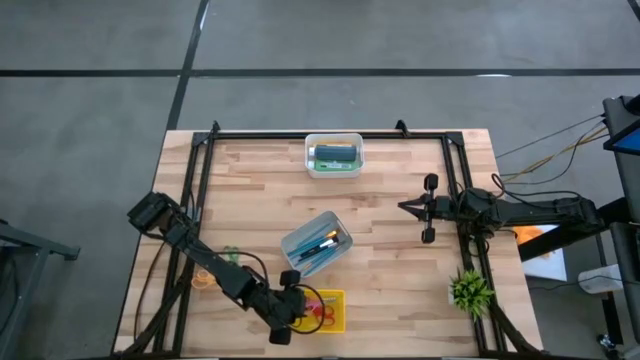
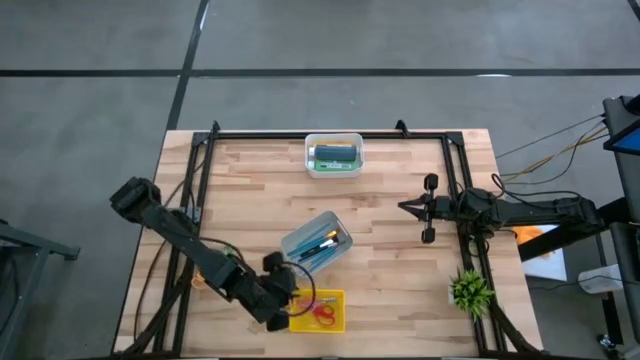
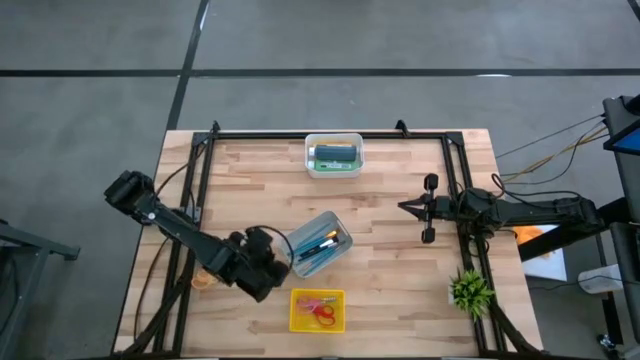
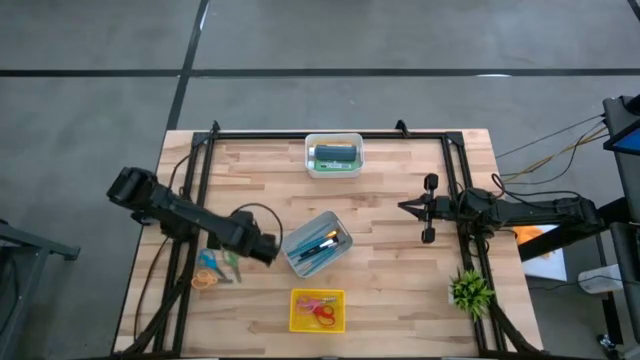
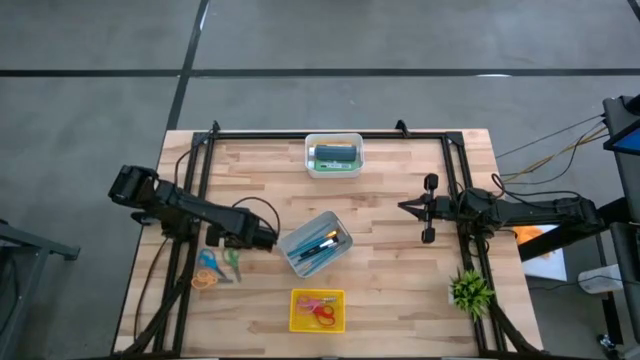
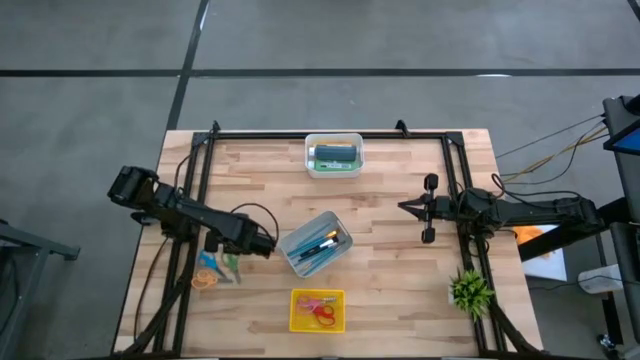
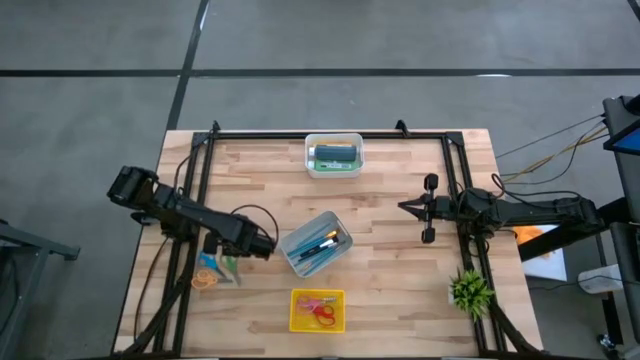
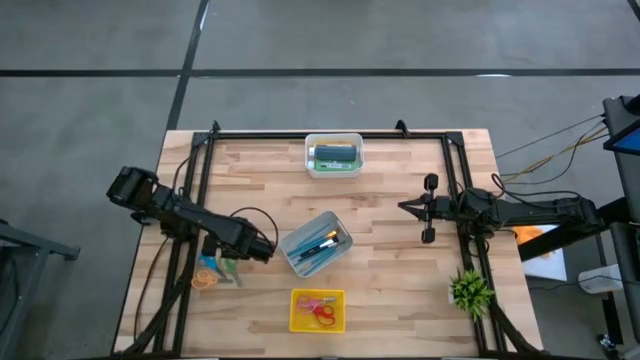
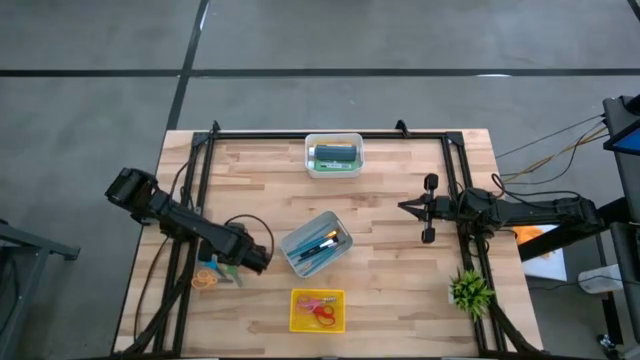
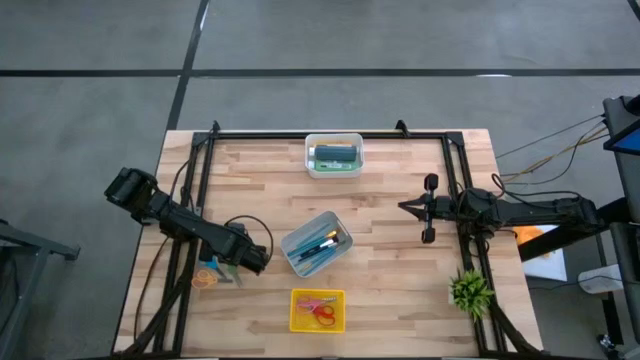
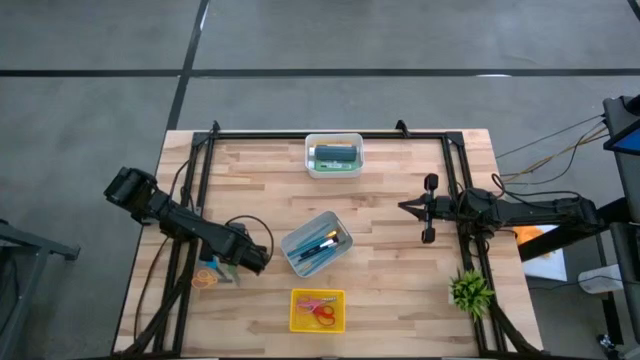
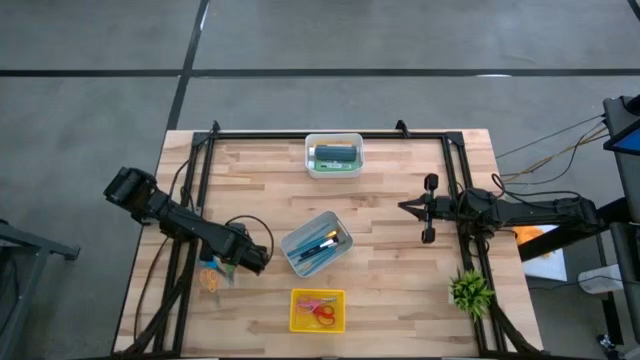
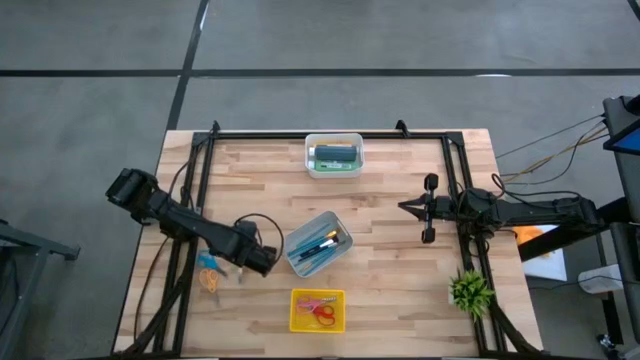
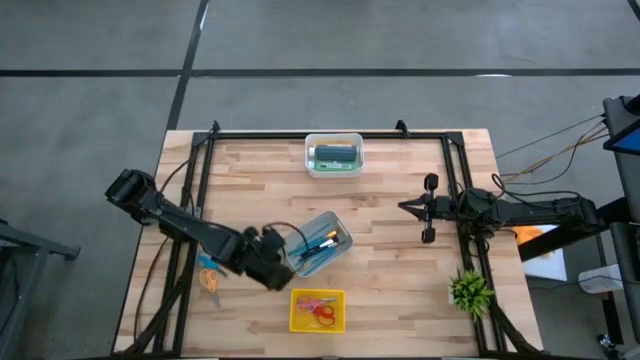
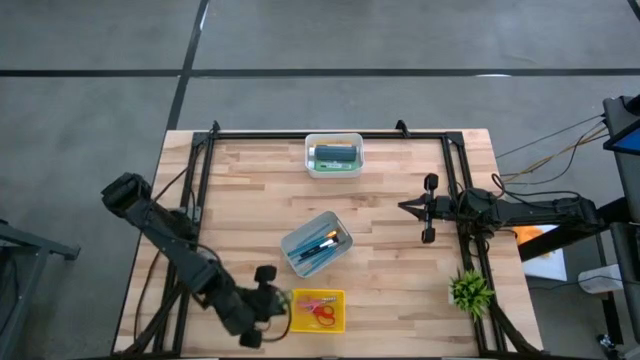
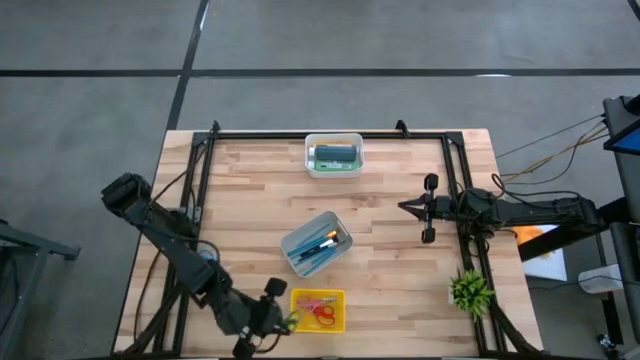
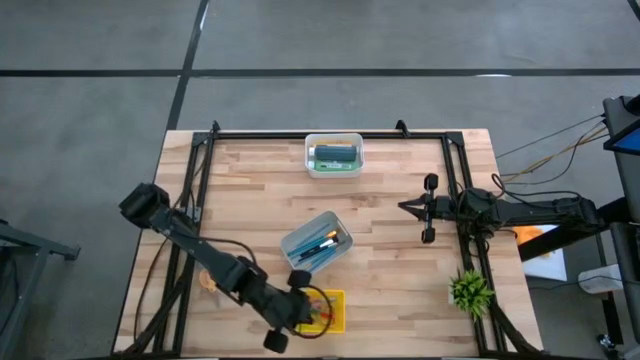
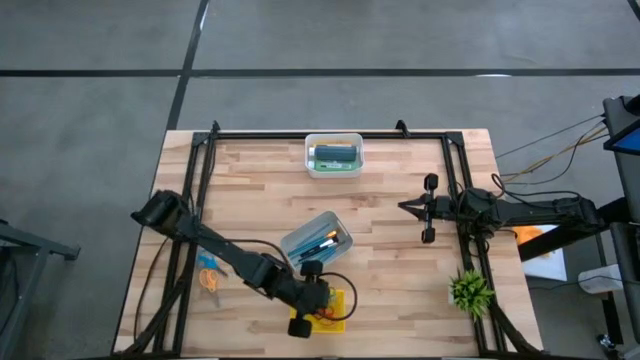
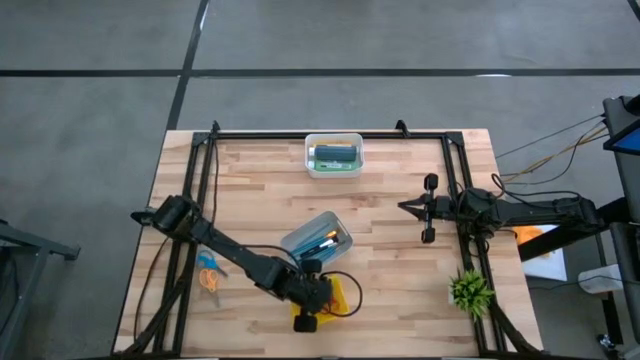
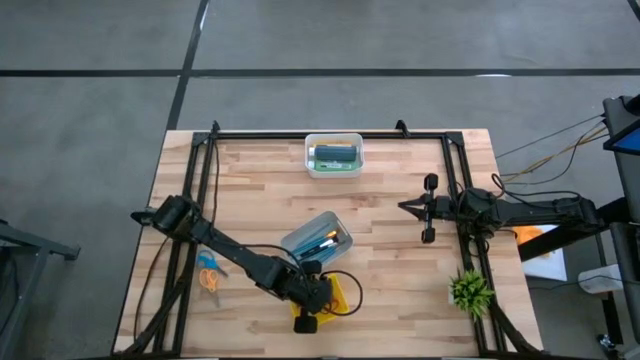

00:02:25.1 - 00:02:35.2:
Task: Pick & Place Paint Supplies
Put the green scissors into the yellow bin

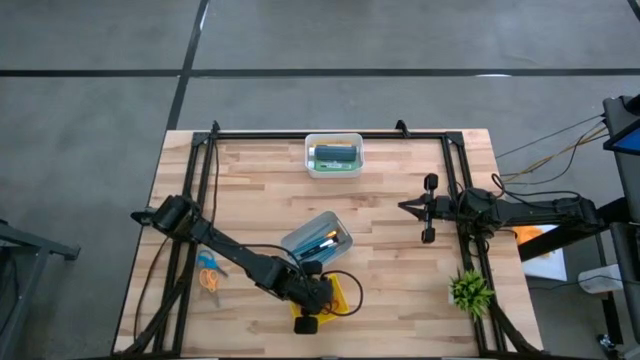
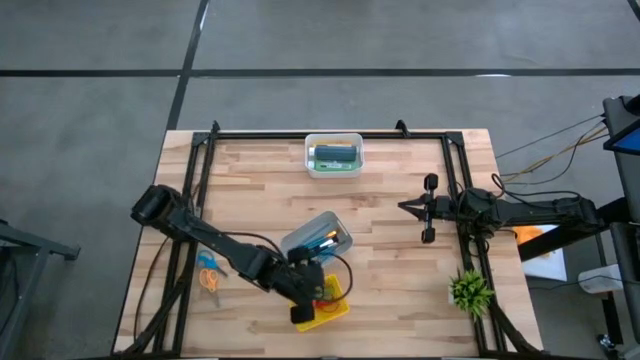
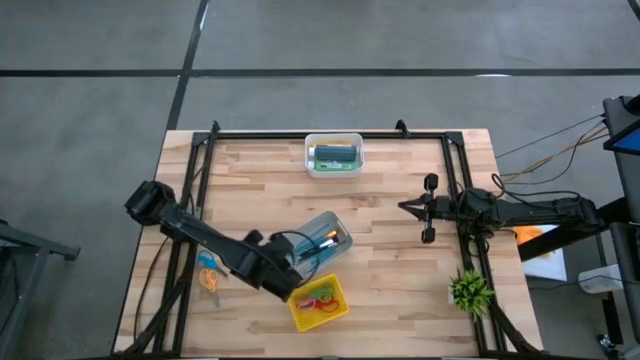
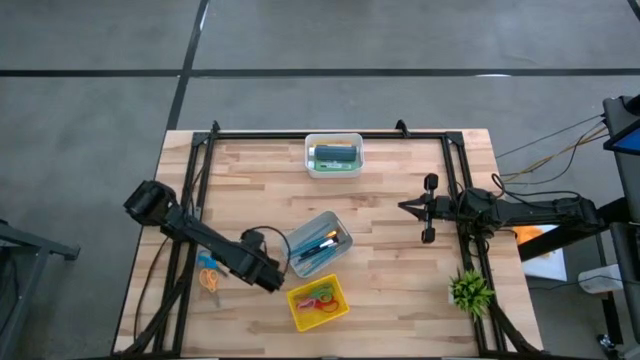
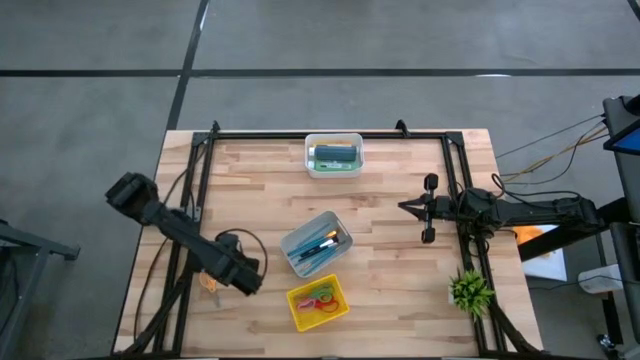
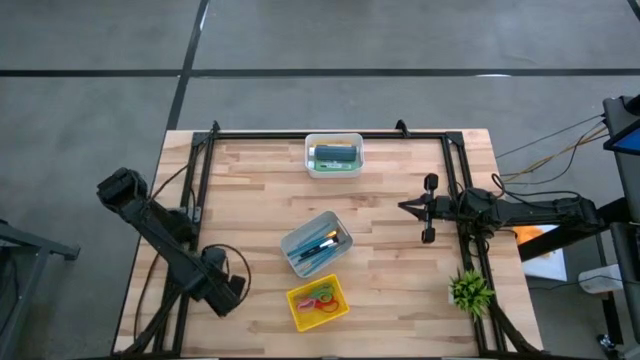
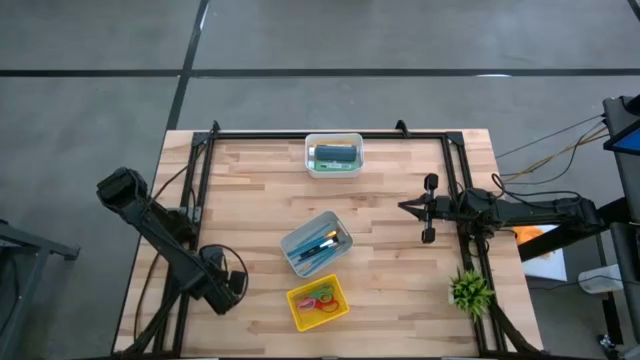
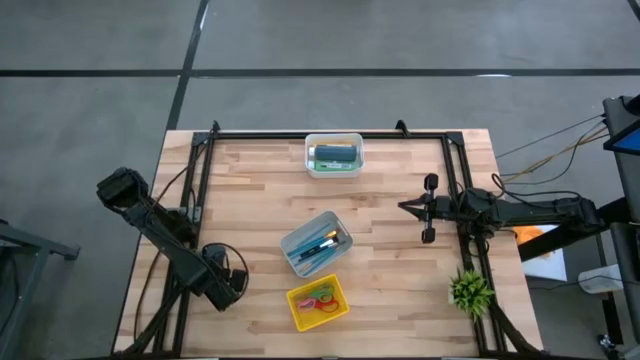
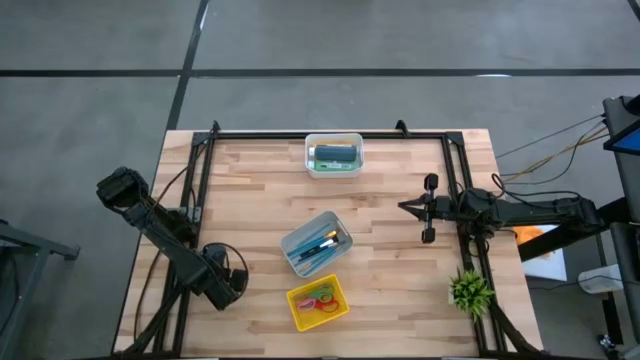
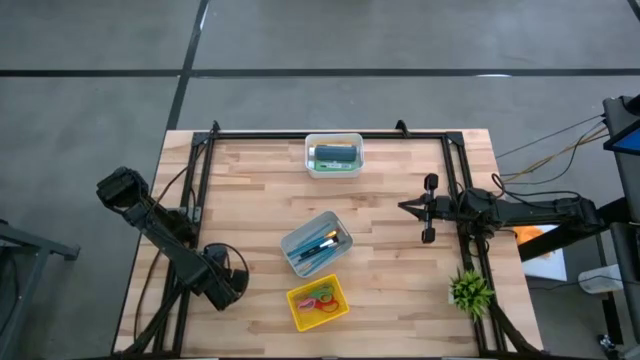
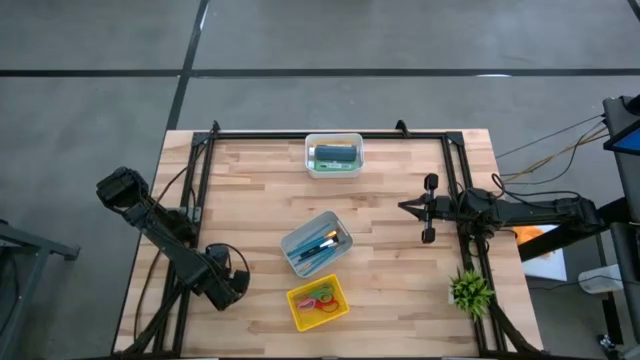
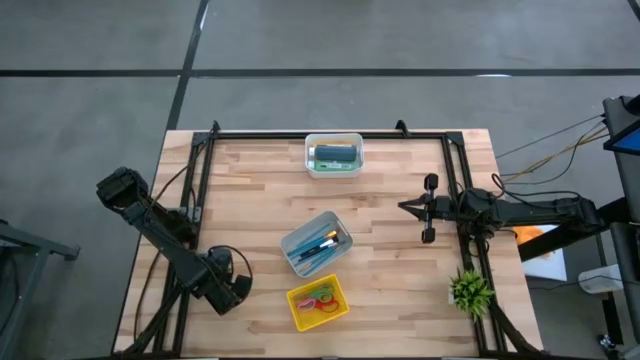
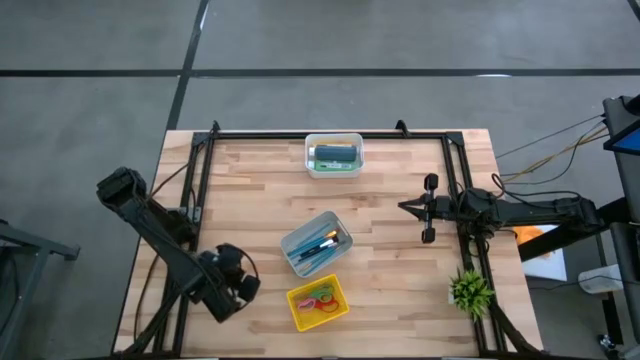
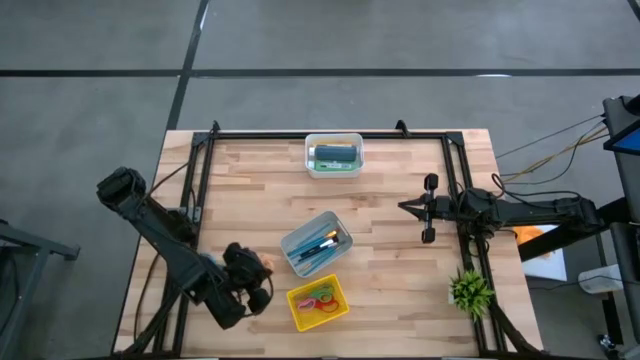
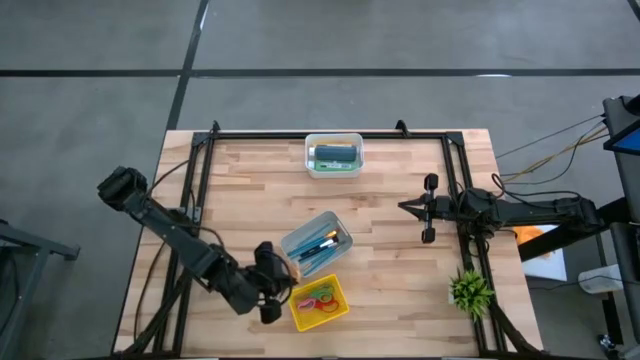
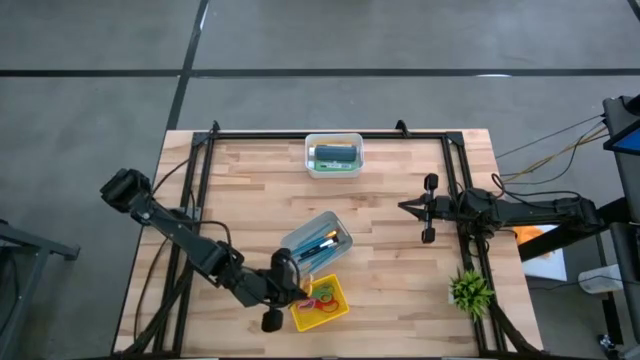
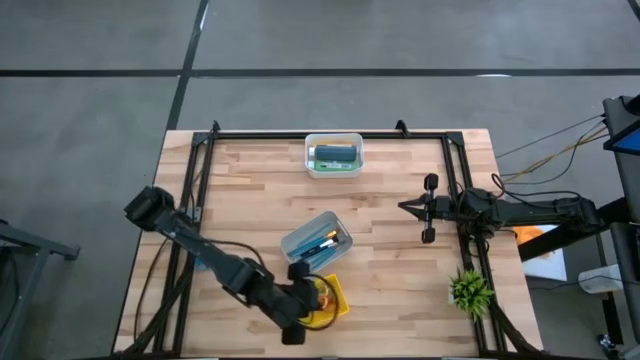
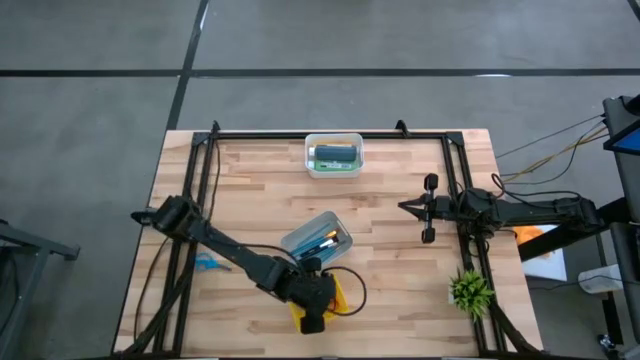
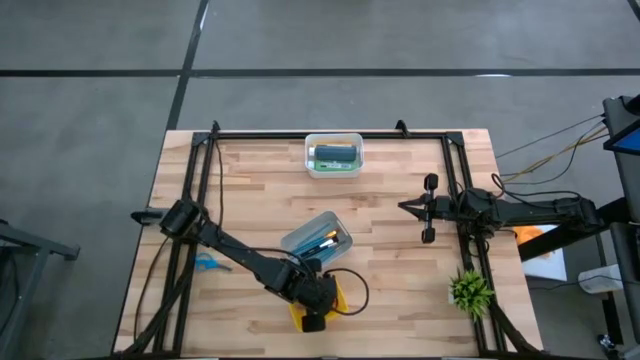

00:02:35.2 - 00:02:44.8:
Put the orange scissors into the yellow bin

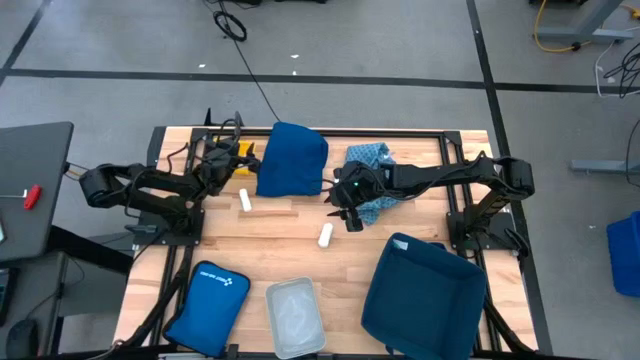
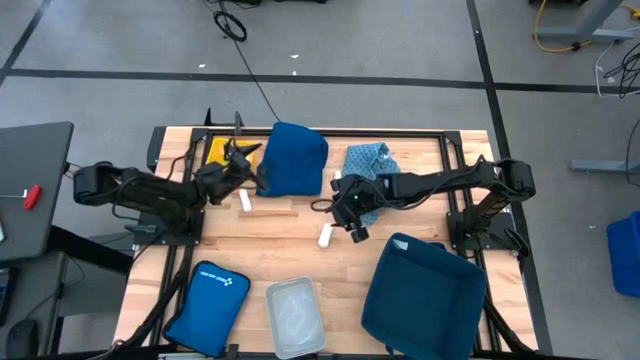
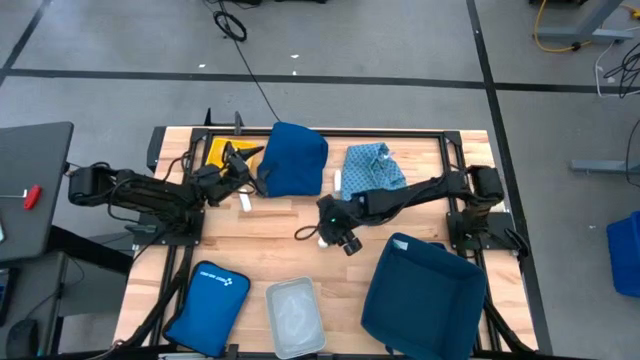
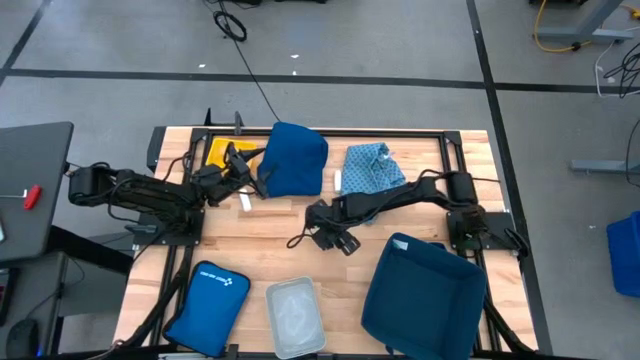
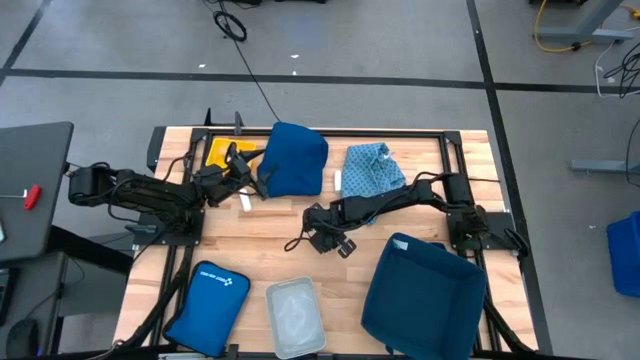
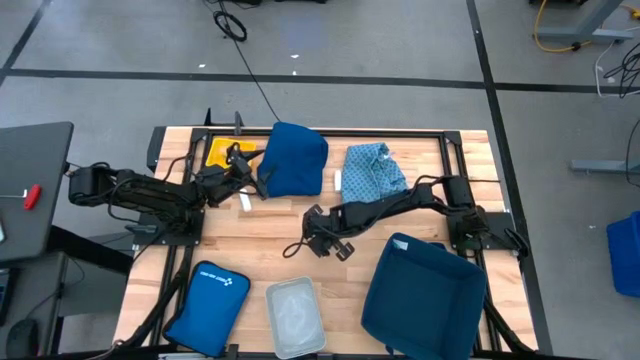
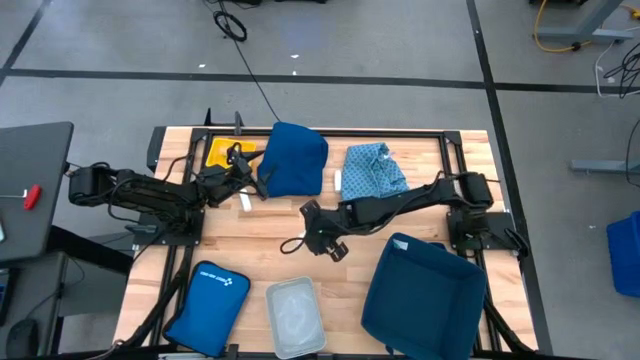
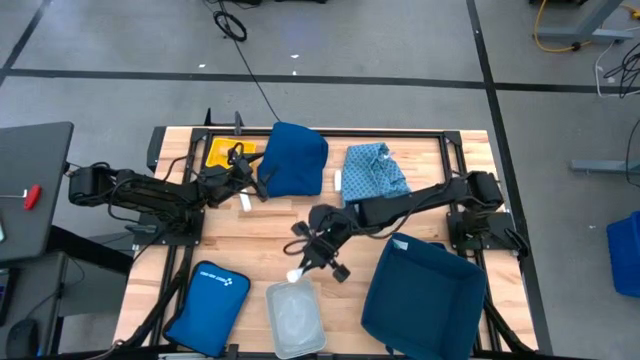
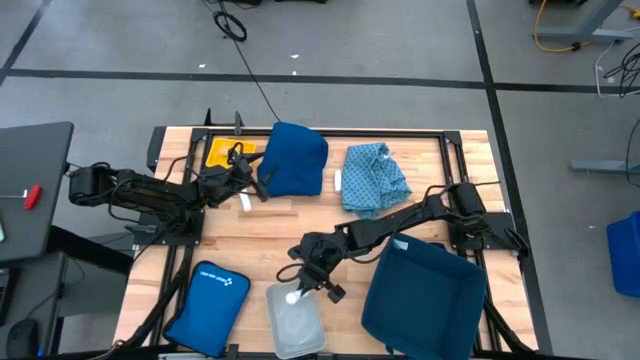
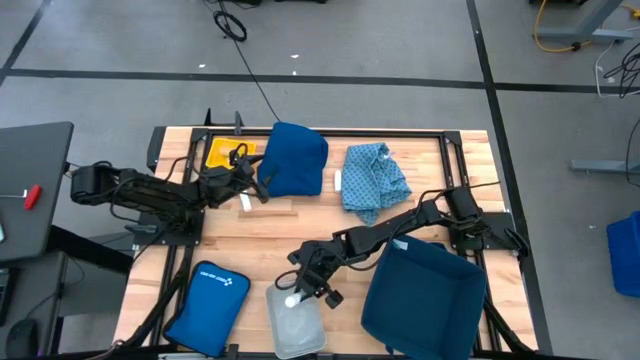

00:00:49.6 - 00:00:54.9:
Task: Pick & place medical supplies in basket/bin
Put the bottom white bandage into the gray bin
